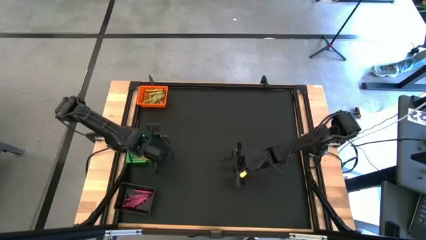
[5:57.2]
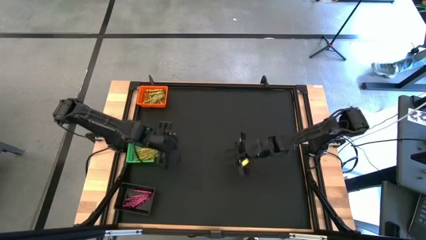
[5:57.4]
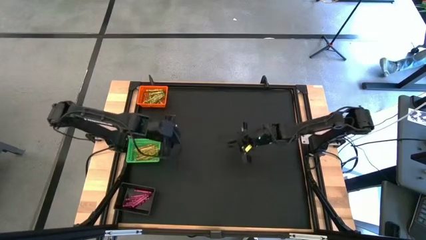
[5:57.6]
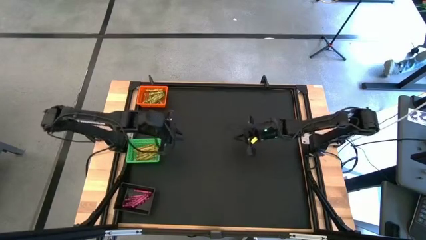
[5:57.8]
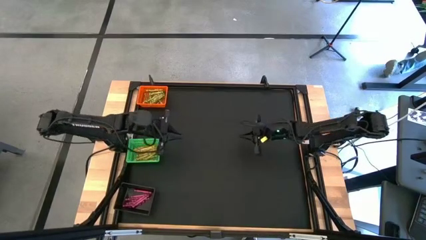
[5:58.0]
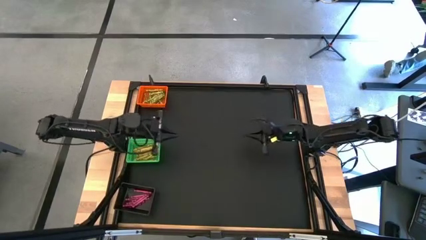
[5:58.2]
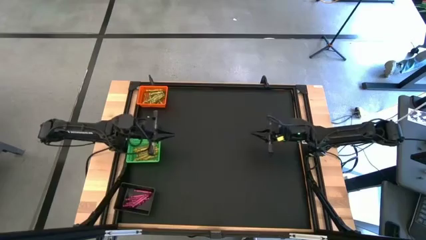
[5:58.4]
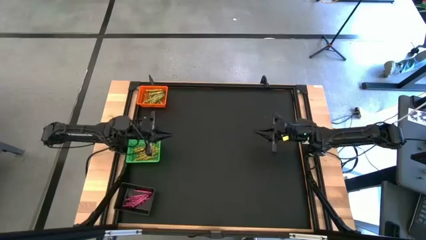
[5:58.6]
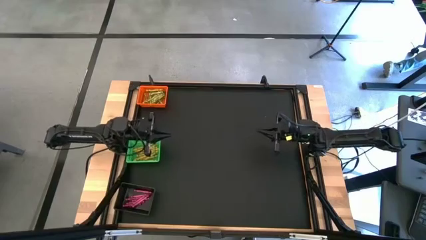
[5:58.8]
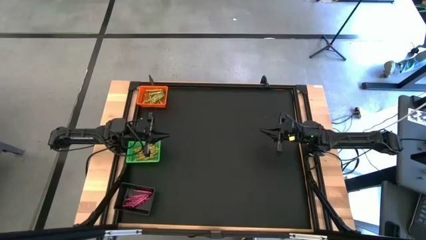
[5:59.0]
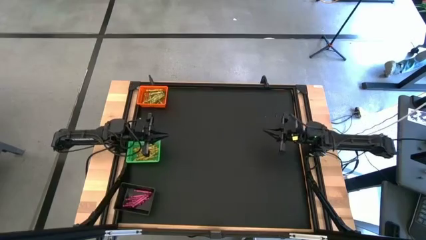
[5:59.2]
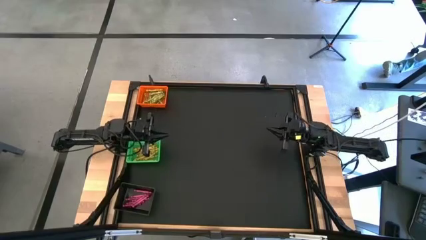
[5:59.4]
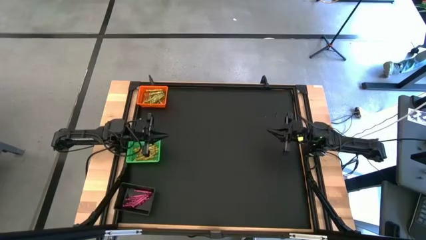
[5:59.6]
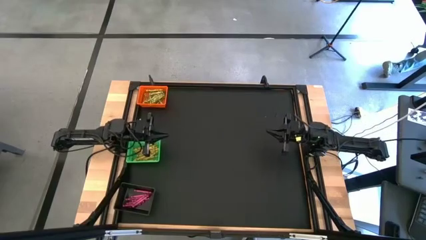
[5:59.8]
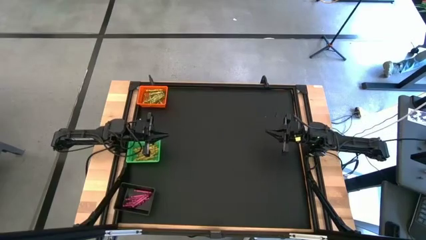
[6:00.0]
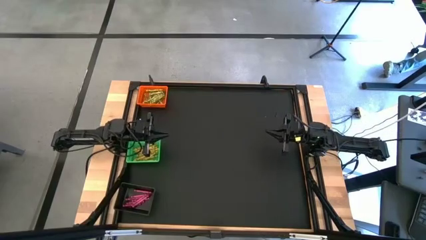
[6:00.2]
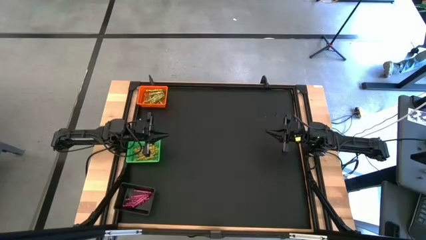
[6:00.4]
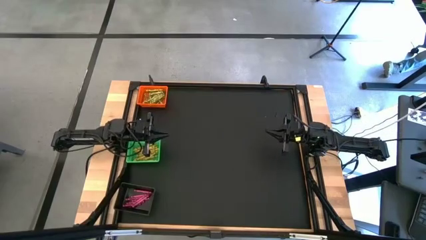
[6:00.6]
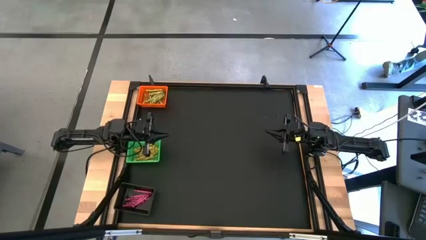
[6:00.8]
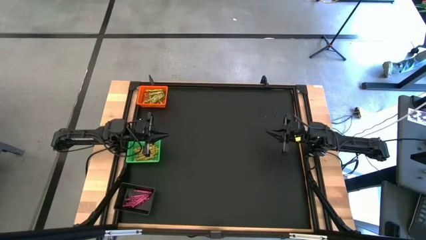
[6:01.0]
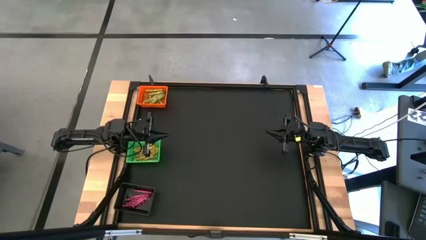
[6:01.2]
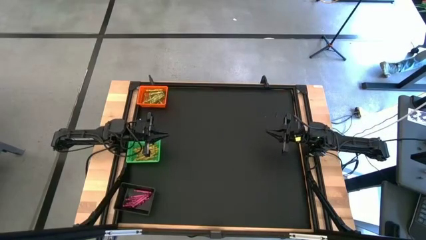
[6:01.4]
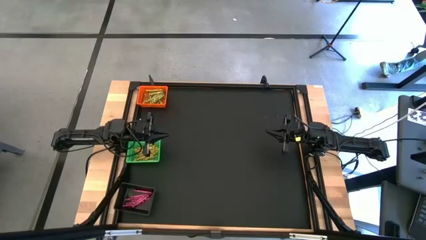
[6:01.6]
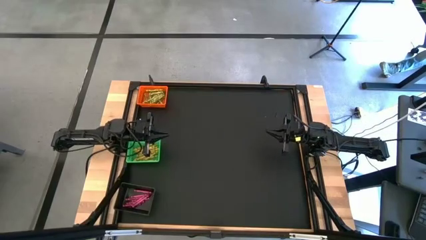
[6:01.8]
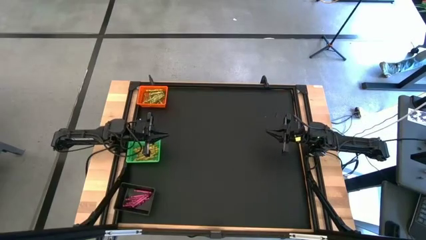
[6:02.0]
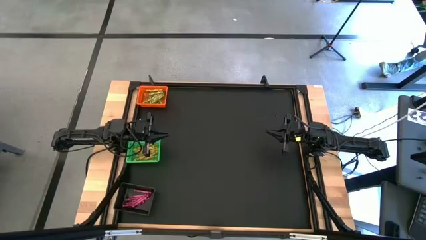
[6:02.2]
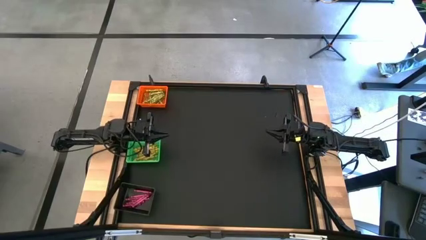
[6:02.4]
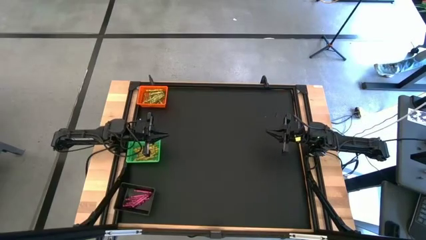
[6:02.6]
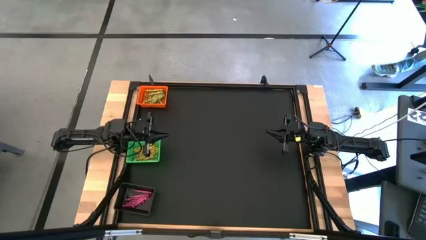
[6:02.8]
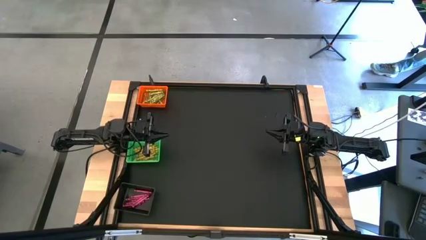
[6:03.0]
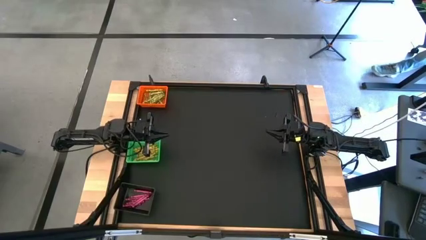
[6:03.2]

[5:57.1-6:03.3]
Task: Sort crayons
Return to Home Position

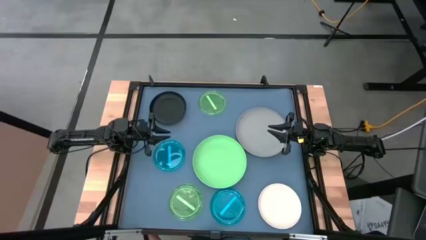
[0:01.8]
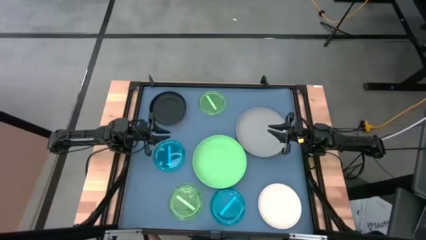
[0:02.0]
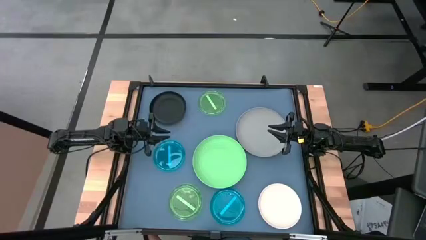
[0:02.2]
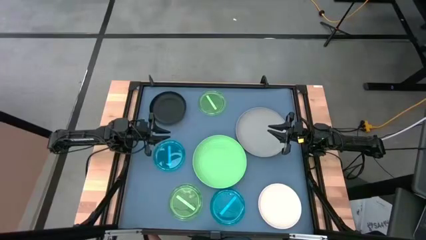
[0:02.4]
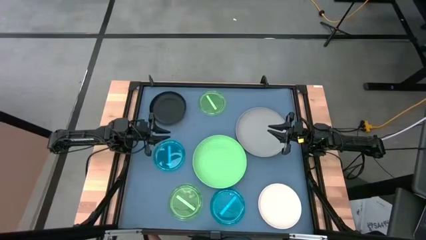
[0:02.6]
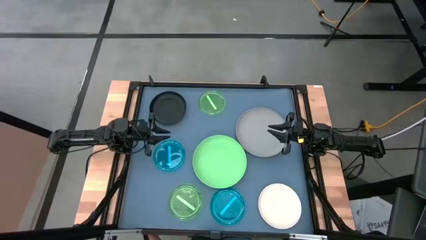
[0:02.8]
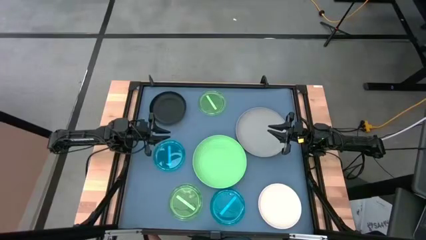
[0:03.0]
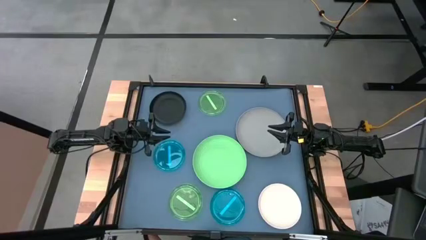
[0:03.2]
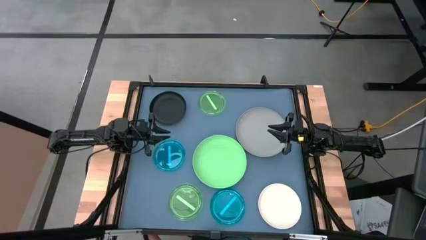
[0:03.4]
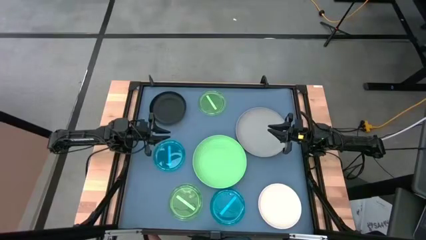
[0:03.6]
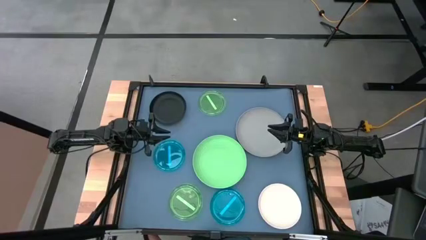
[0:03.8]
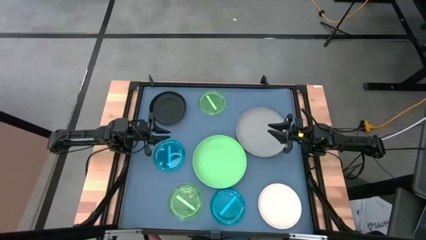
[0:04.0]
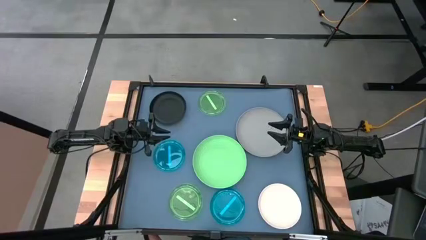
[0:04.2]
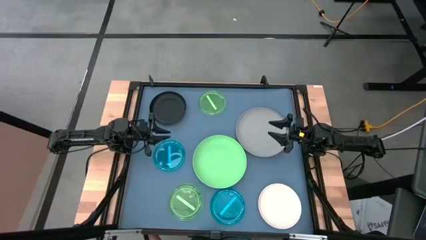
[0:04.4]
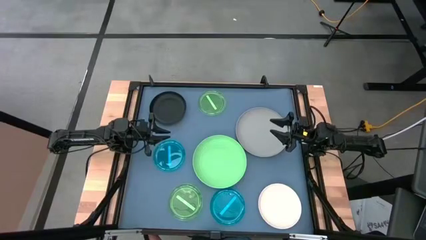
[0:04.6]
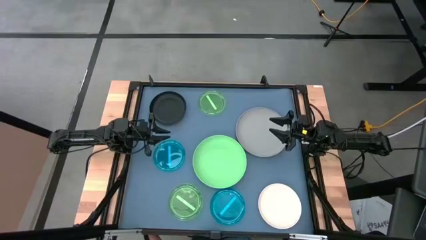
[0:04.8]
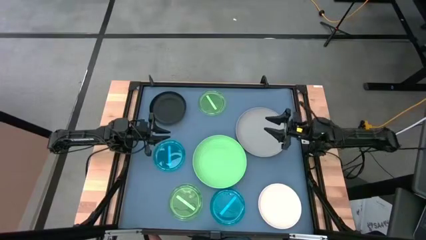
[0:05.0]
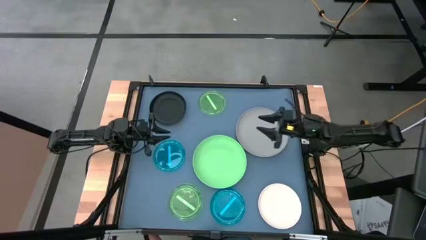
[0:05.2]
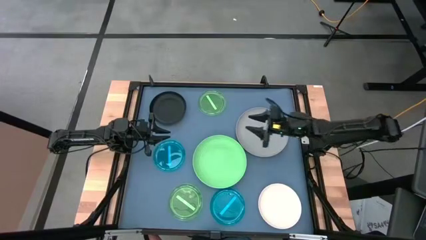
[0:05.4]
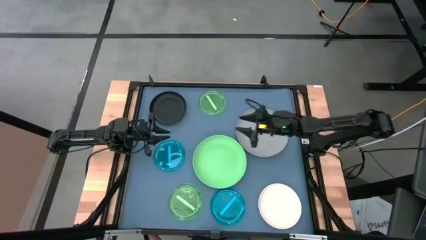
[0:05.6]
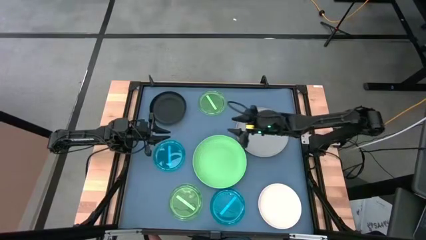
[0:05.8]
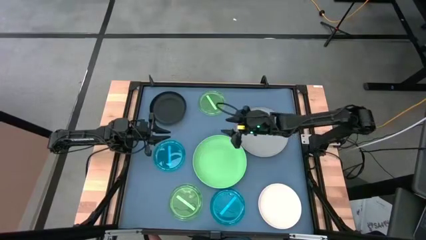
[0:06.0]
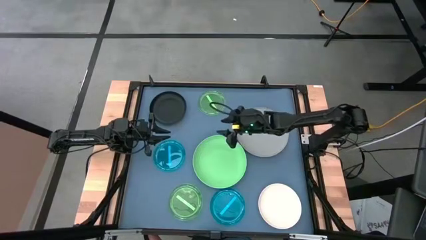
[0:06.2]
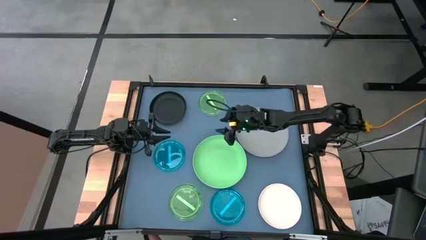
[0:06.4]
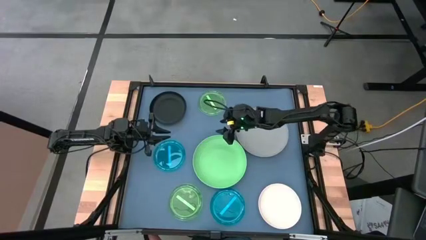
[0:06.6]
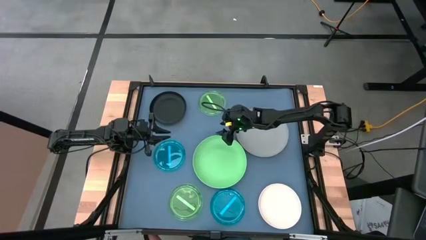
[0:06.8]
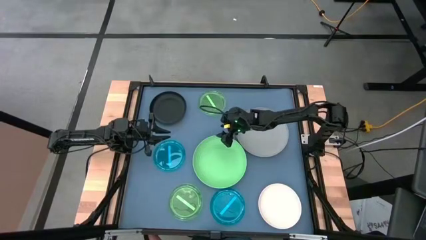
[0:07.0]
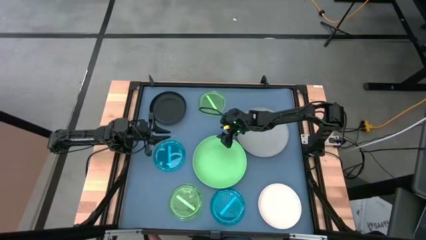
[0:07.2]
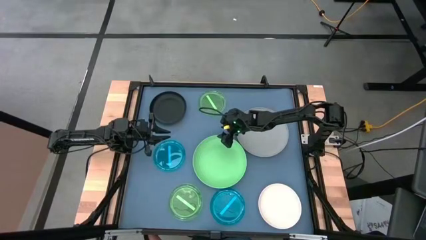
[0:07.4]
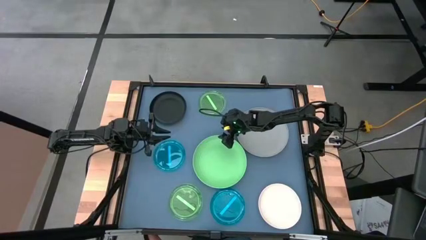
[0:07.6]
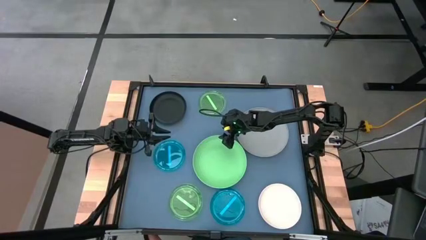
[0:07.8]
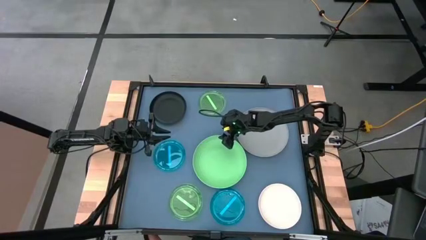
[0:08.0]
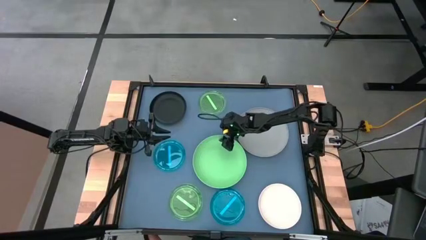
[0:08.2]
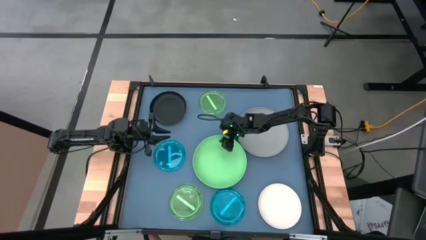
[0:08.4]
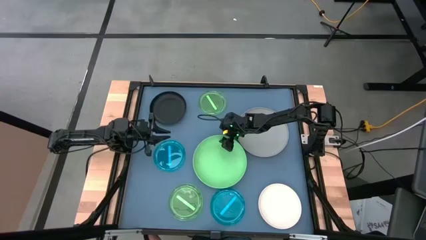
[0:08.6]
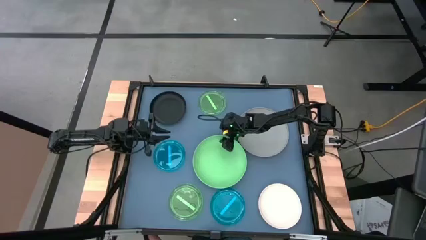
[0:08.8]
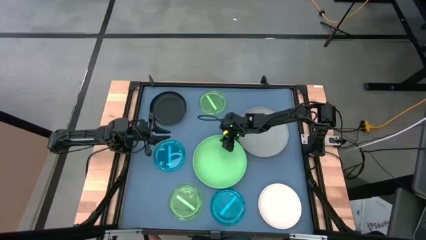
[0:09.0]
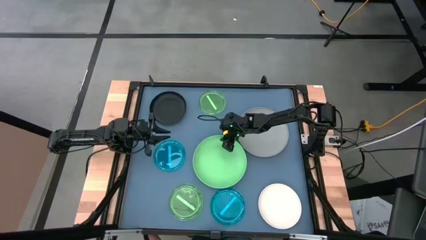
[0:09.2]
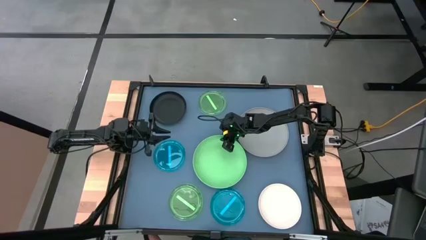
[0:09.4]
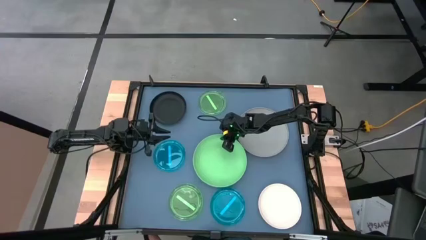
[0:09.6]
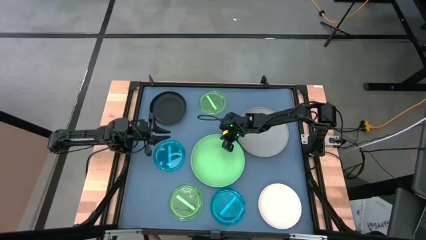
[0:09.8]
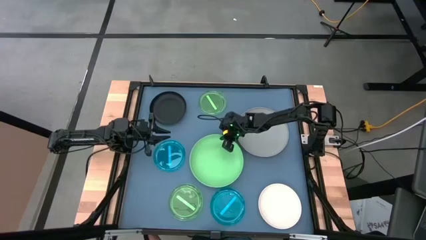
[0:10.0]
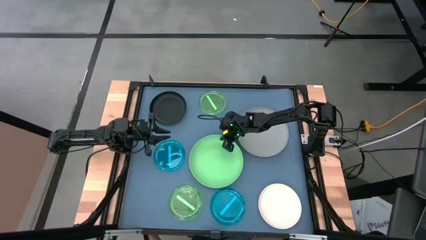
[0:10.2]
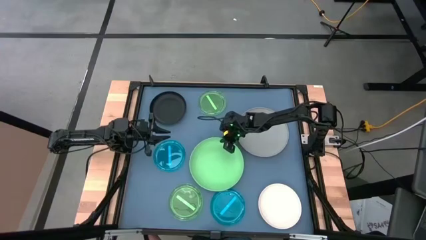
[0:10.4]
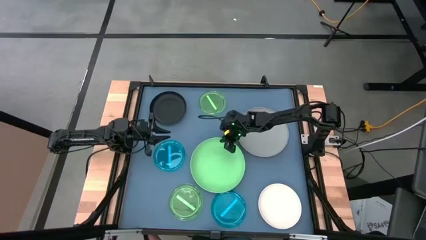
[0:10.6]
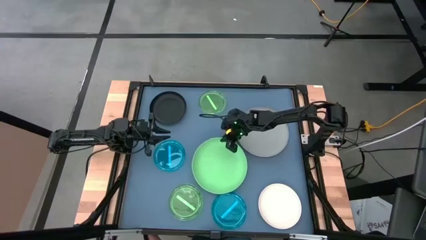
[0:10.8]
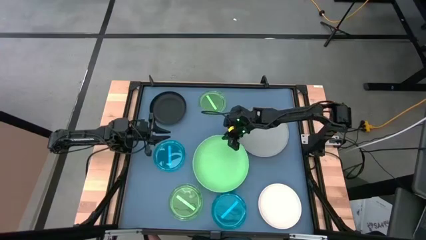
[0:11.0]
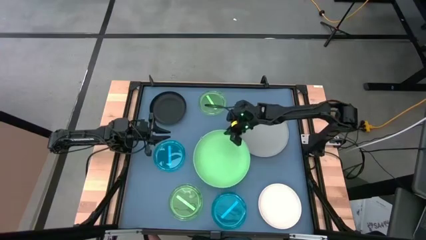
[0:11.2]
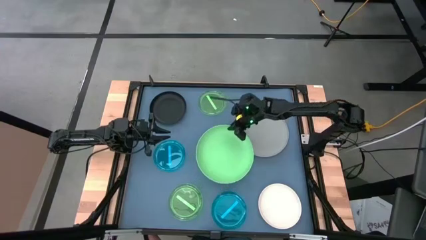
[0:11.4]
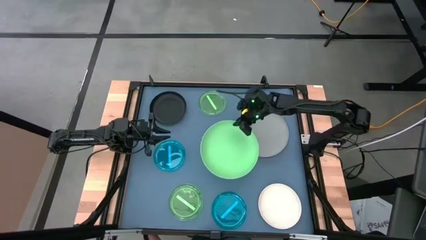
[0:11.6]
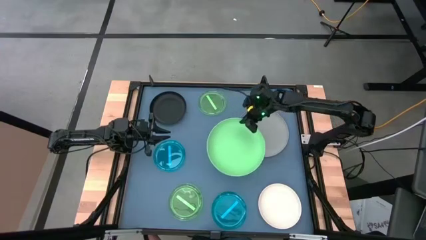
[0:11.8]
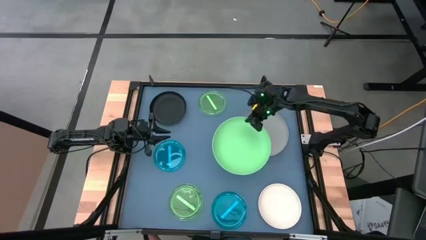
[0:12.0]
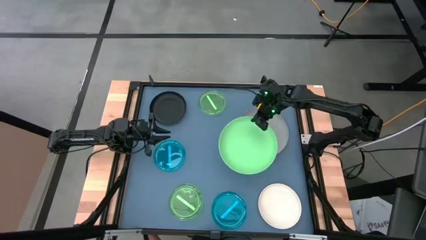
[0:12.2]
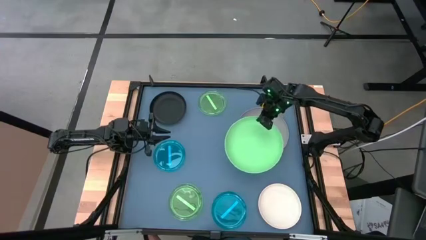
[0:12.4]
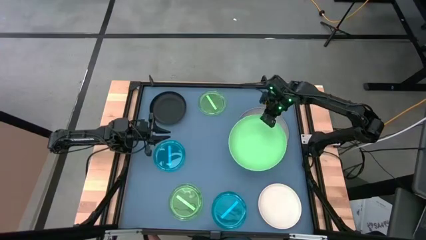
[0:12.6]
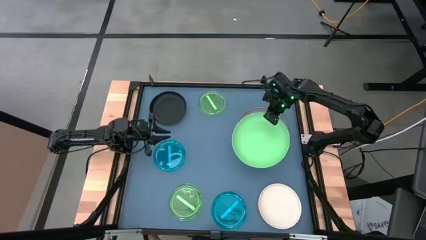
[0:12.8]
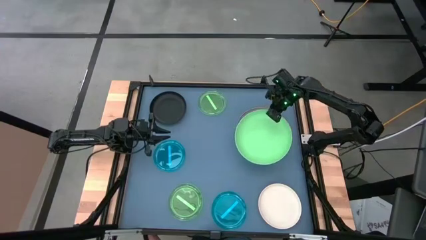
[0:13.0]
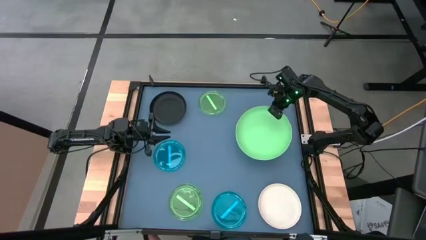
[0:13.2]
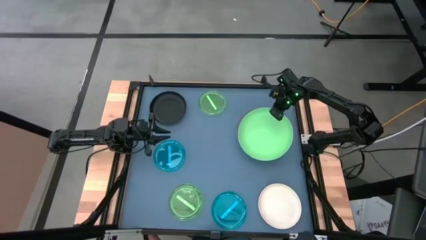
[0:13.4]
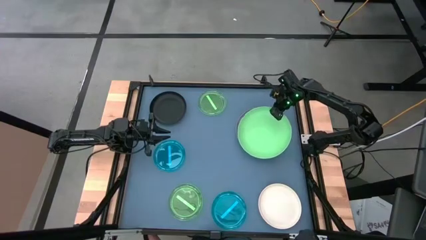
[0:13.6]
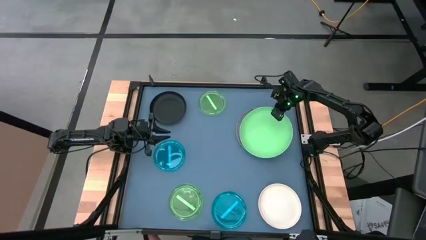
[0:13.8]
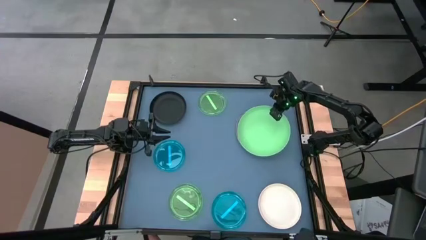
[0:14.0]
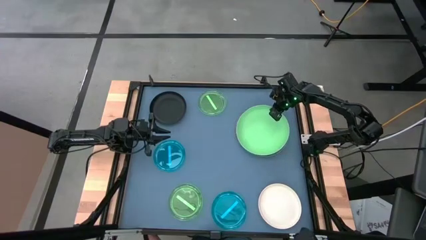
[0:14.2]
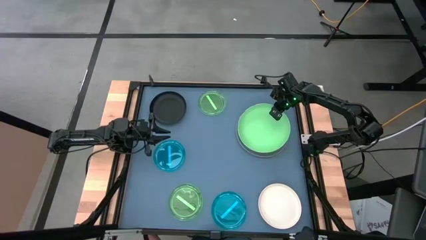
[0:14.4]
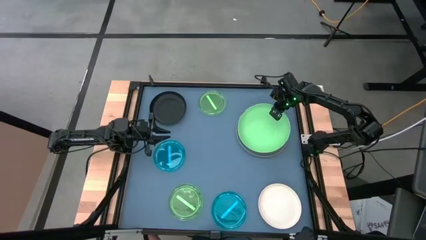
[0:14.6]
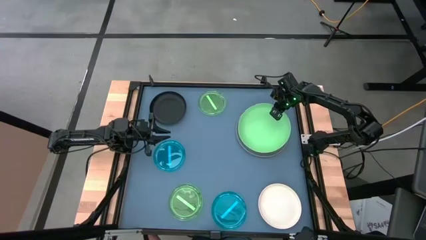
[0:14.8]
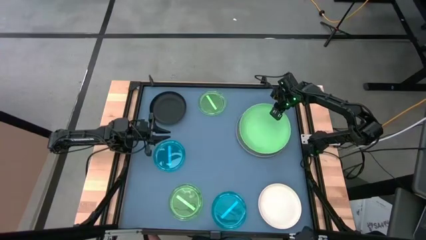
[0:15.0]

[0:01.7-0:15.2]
Task: Stack plastic plates
Stack the large green plate on the large gray plate
